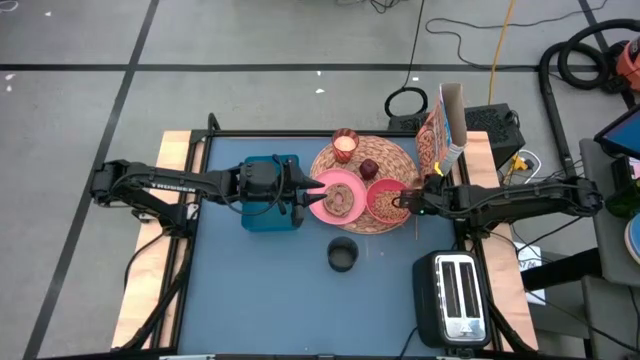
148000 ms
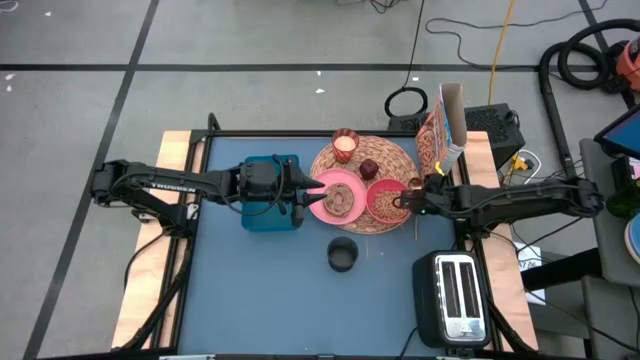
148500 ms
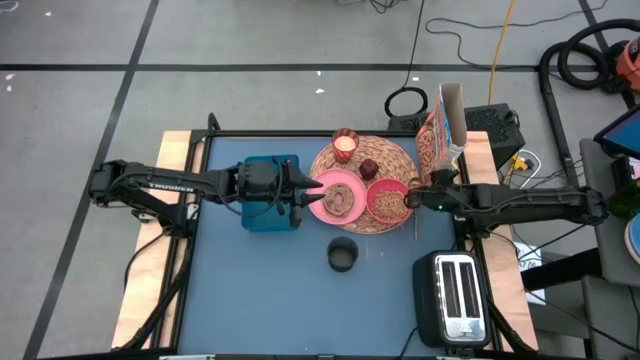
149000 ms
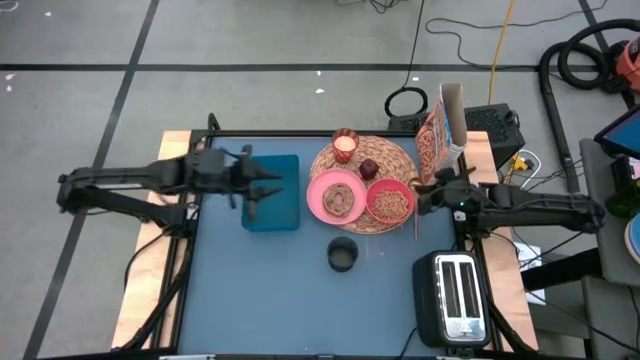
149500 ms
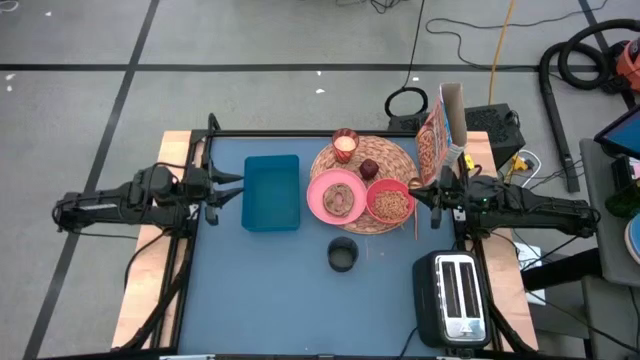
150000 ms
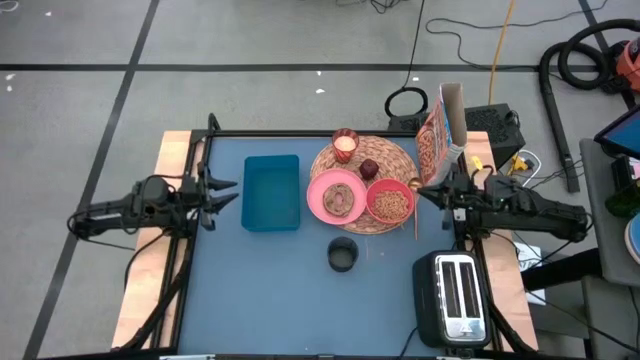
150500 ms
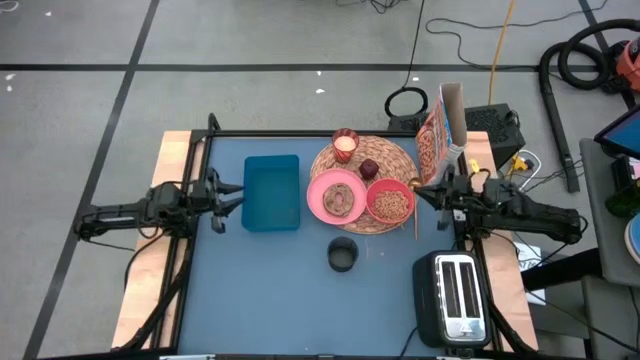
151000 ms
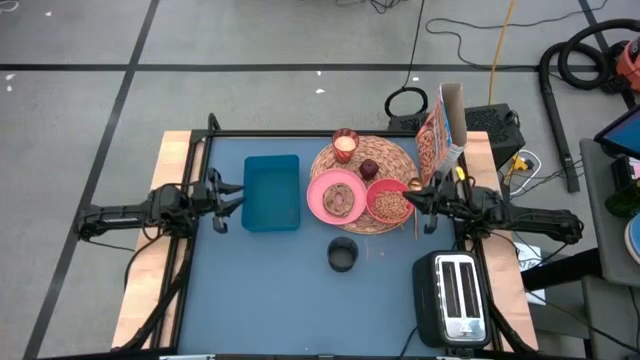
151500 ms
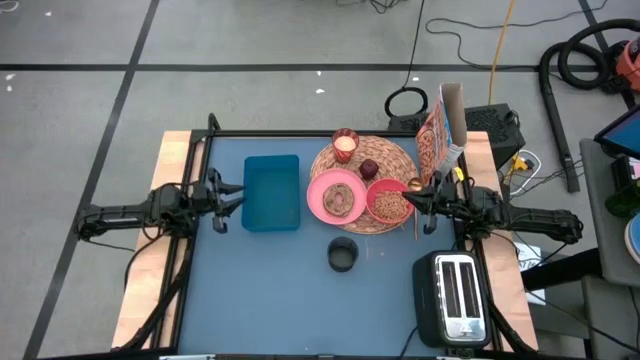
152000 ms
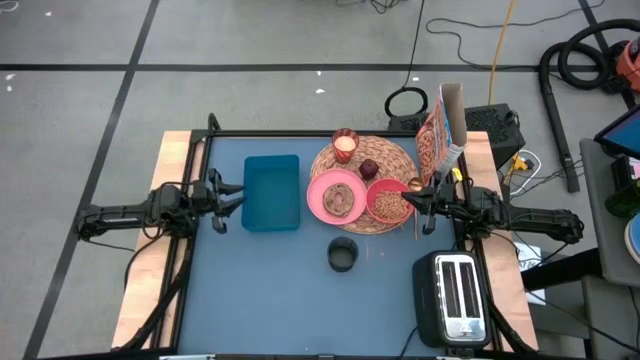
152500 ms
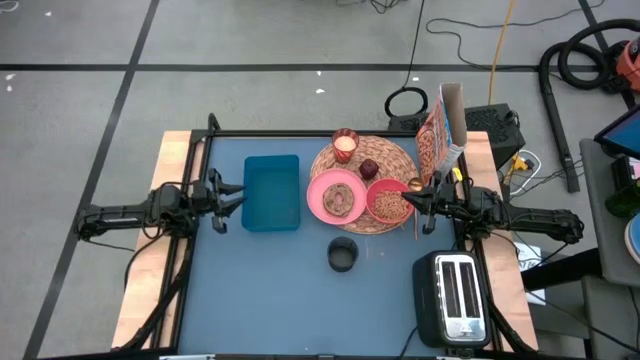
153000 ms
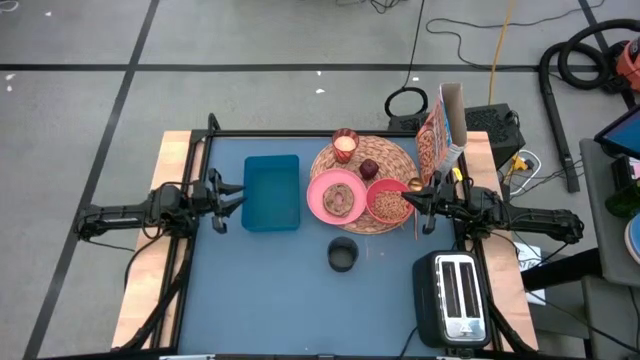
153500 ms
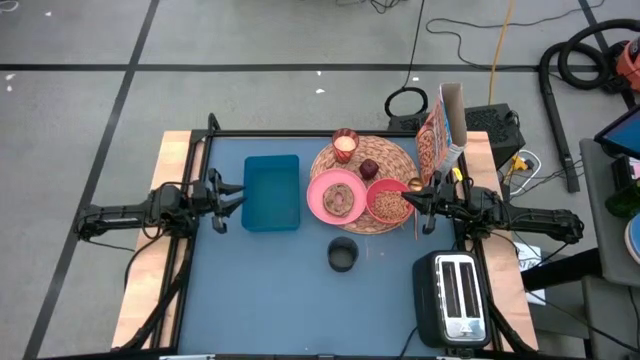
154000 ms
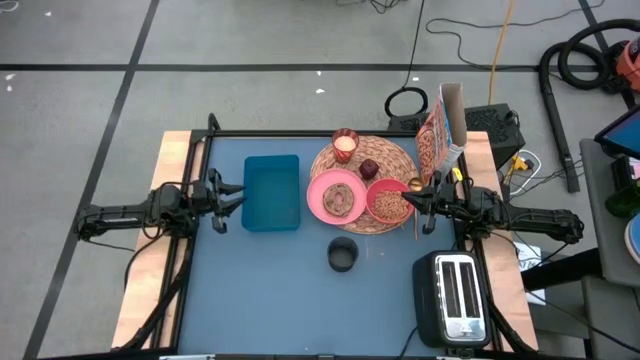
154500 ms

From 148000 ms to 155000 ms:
Task: Arrange a breakfast setting
Return to Home Position

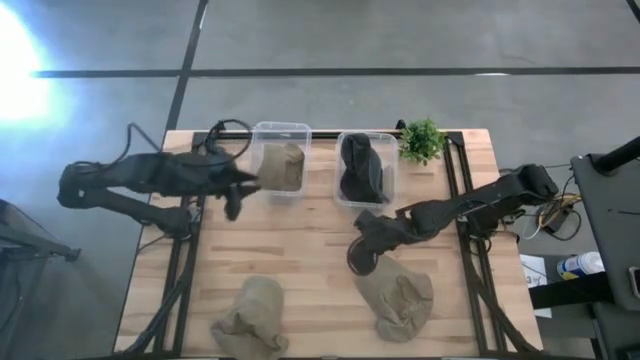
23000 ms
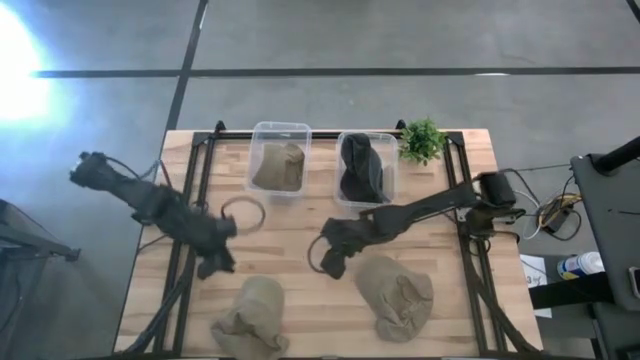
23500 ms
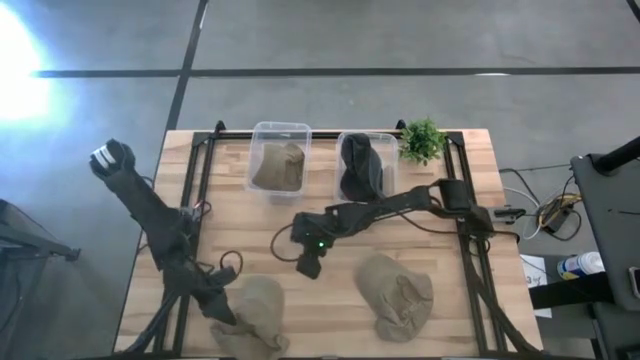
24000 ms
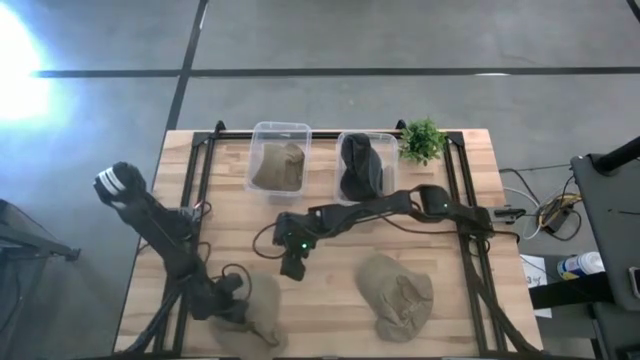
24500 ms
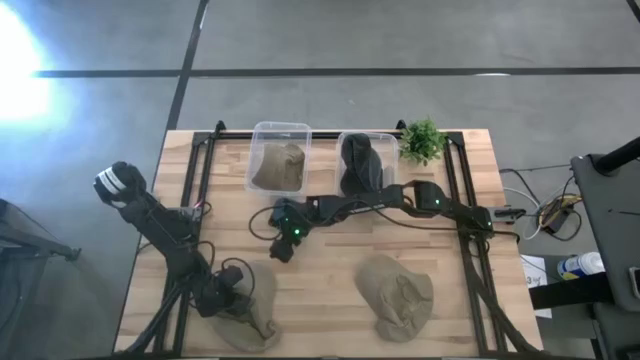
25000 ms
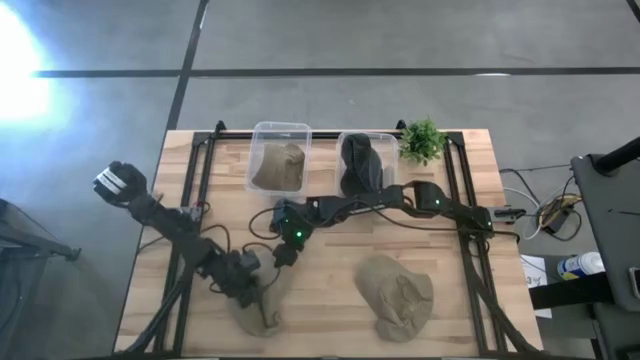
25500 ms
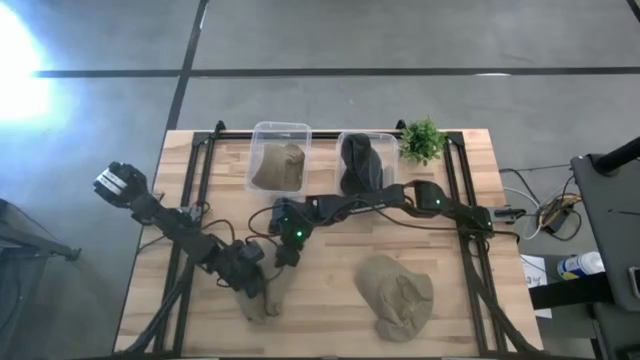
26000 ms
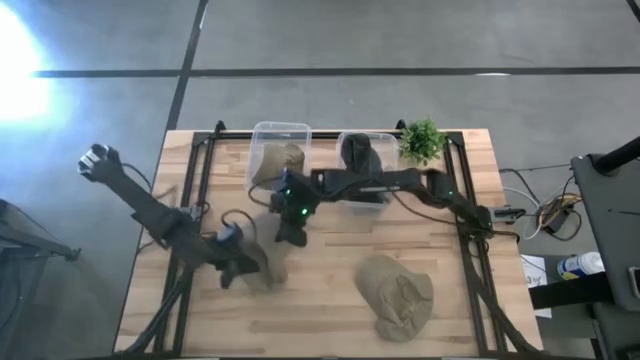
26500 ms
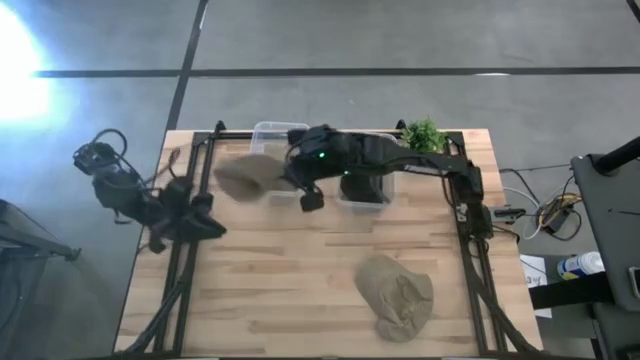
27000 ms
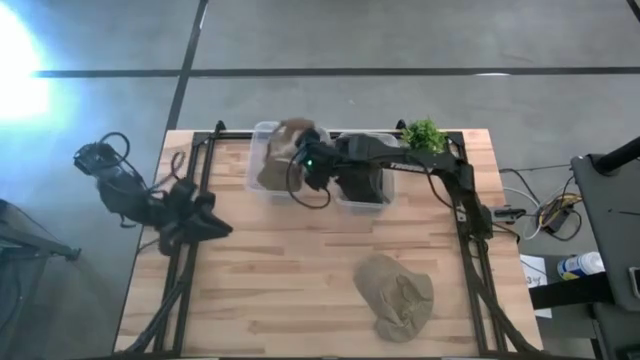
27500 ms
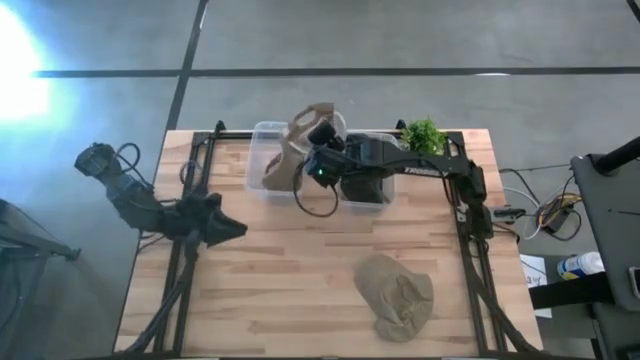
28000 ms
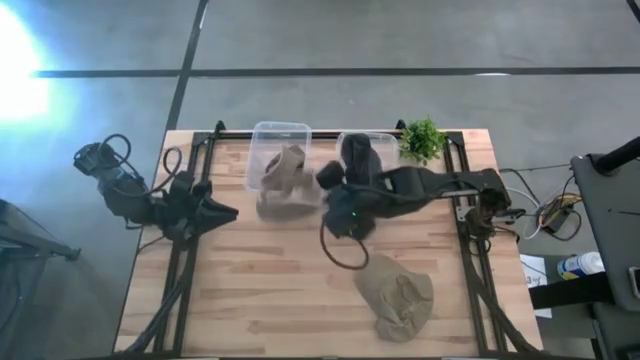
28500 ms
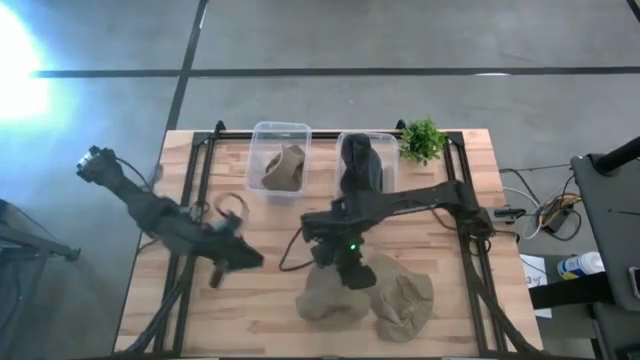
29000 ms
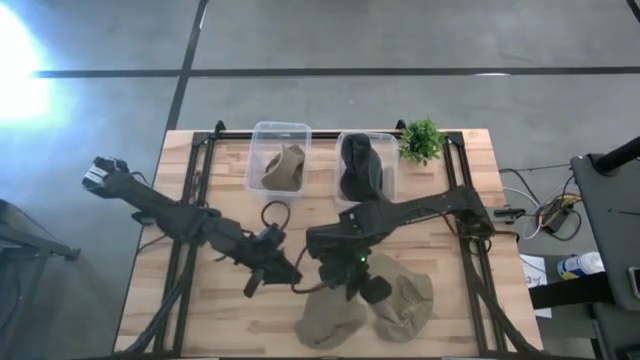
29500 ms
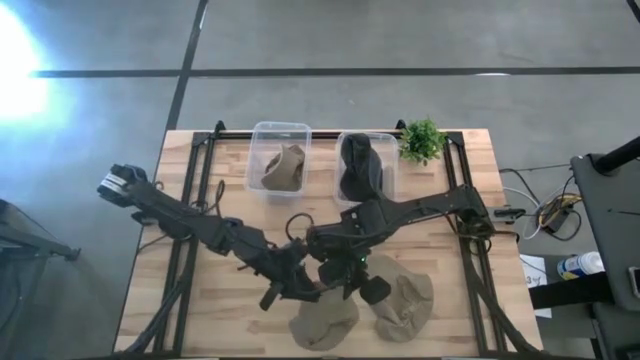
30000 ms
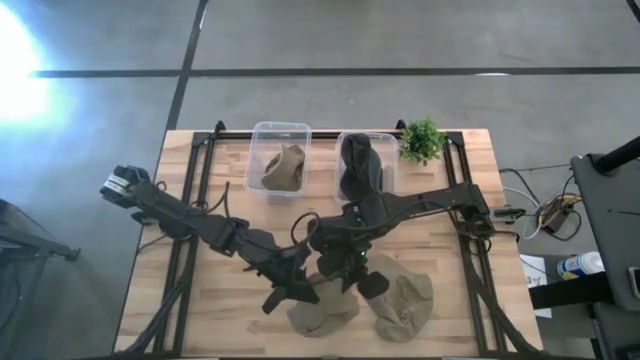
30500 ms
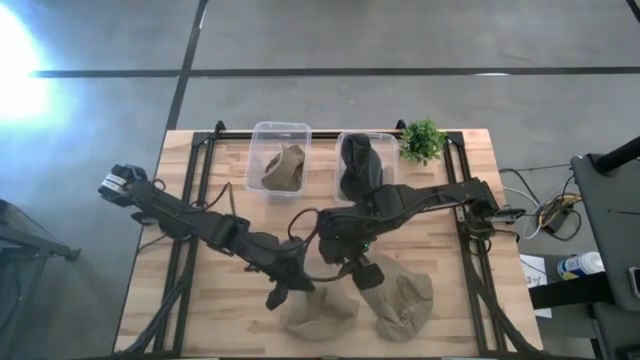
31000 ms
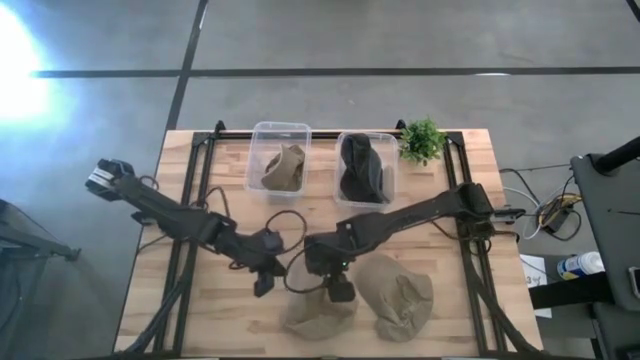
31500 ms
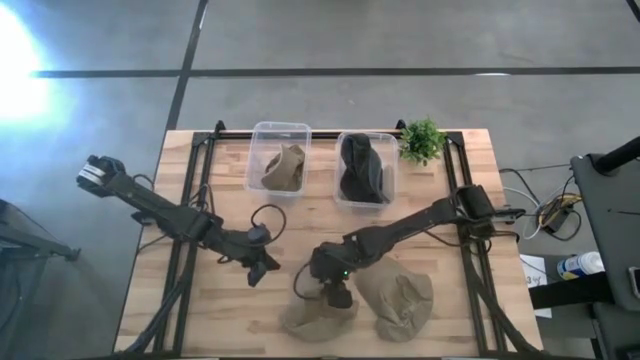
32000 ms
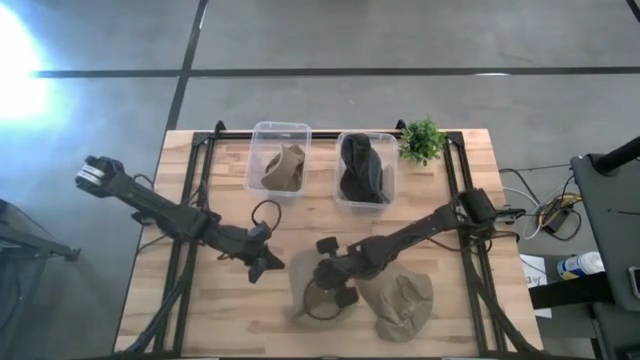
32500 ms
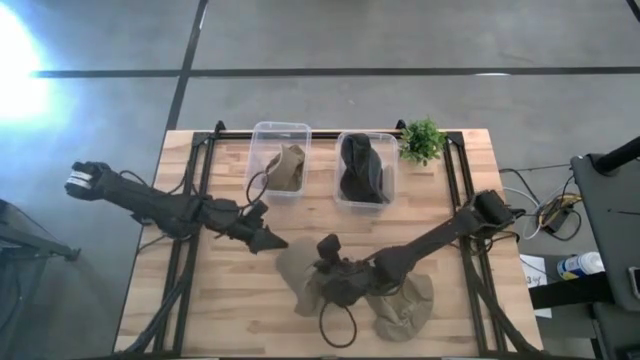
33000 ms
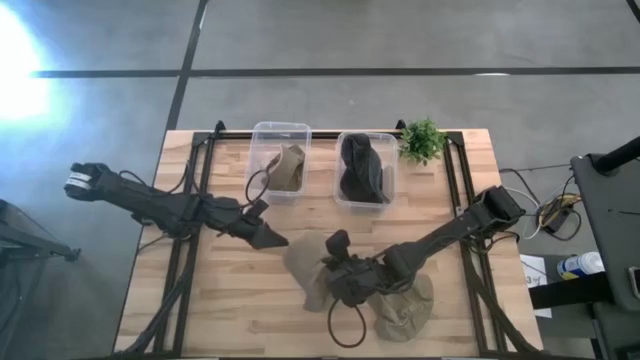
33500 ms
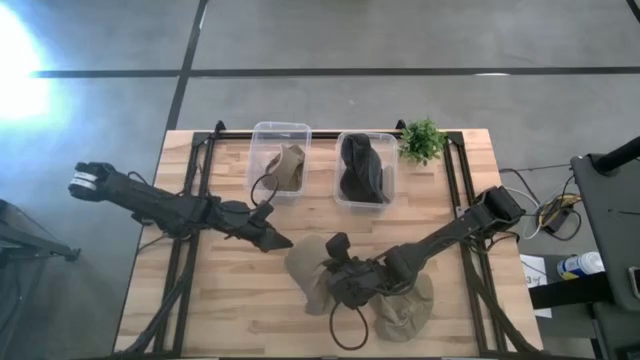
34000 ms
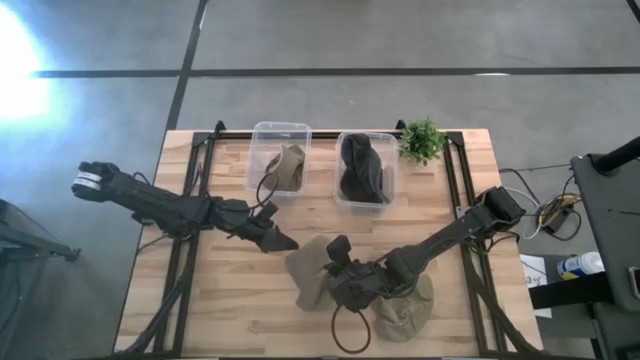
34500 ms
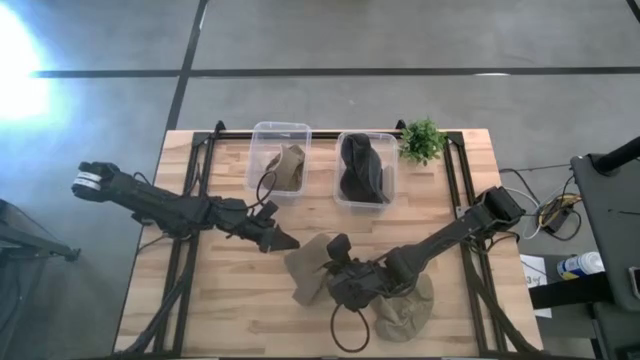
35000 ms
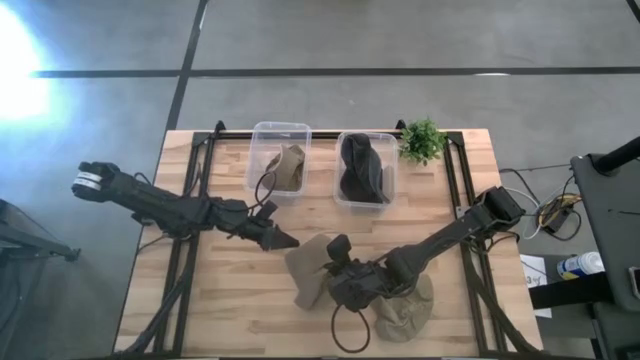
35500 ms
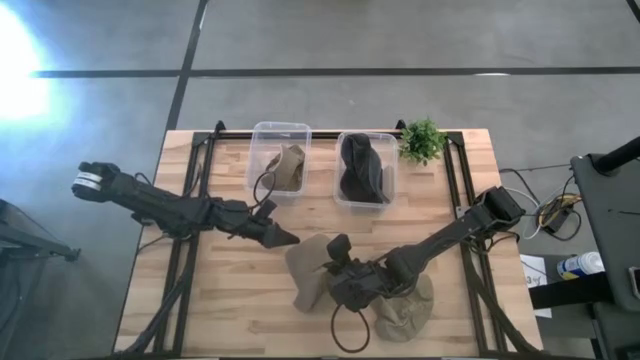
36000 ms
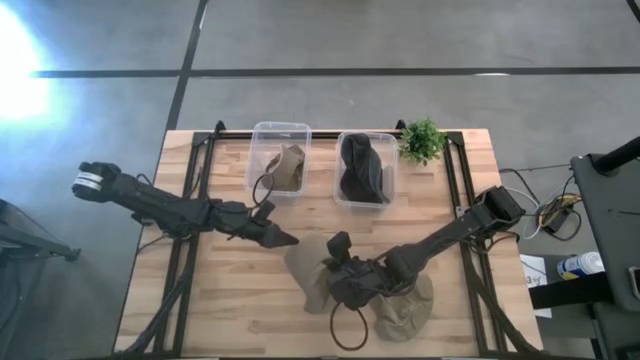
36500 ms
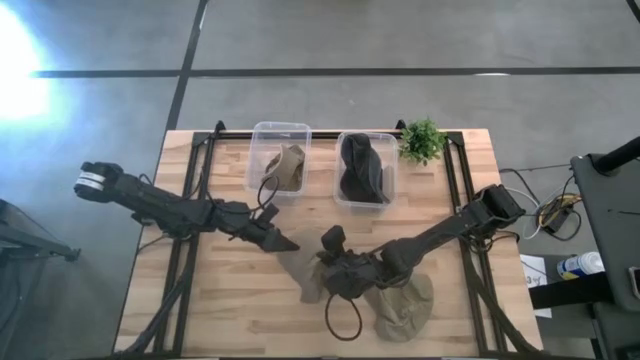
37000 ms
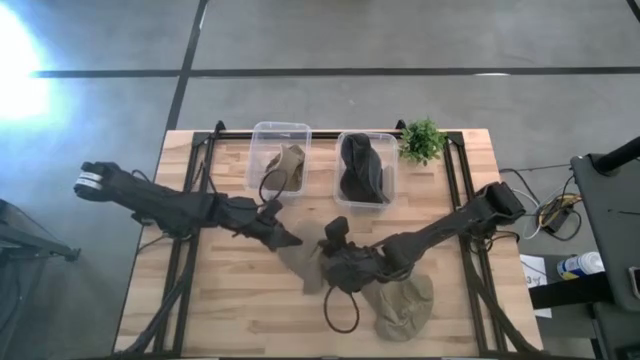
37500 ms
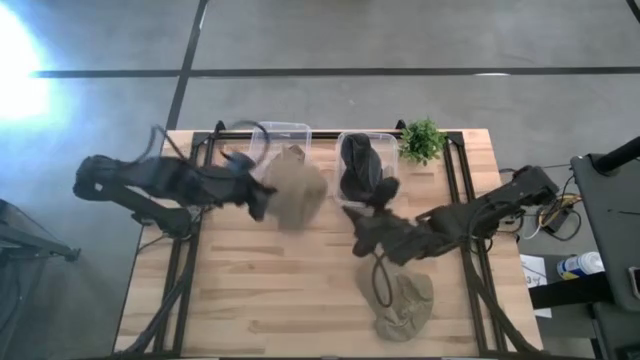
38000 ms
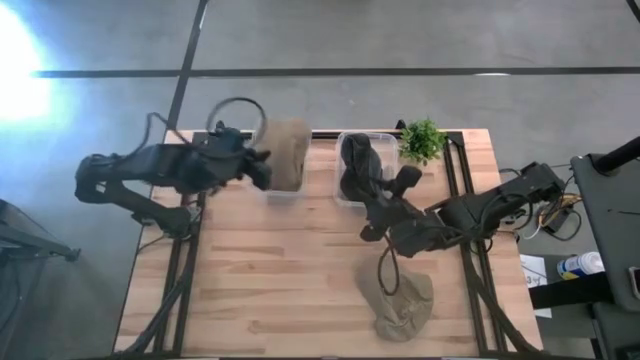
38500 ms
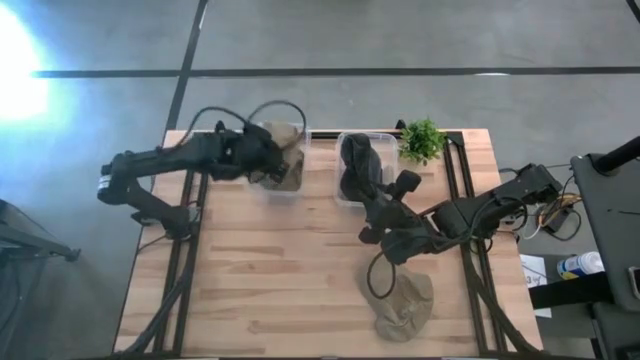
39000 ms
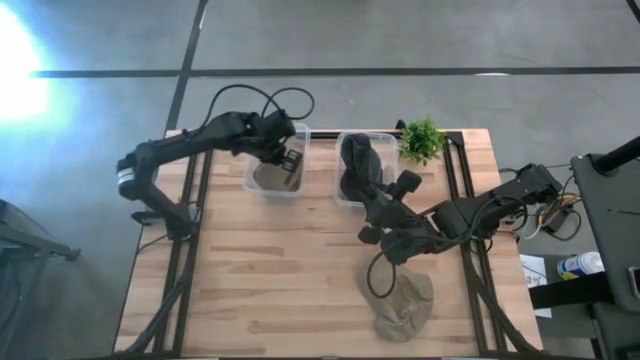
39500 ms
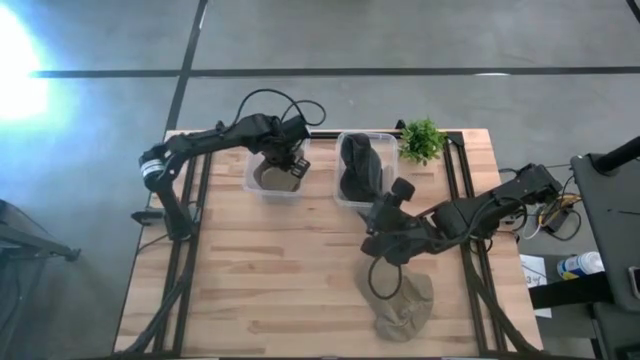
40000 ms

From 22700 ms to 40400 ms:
Task: Pick & Place hat
Put the left brown cap into the left transparent bin
